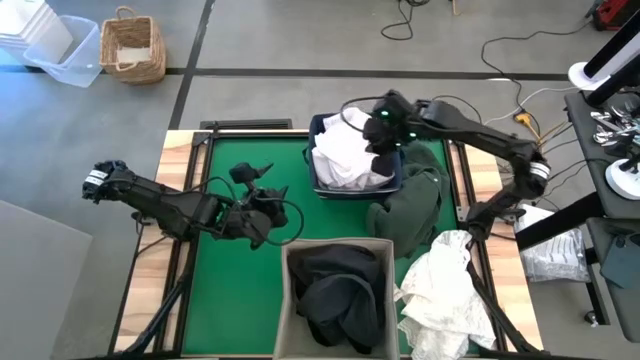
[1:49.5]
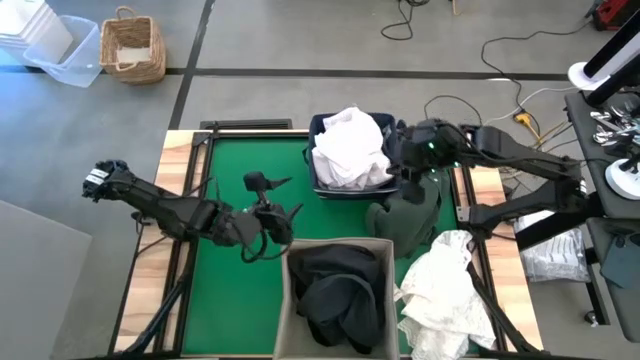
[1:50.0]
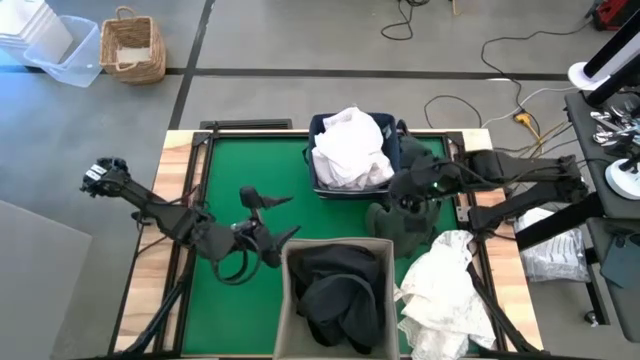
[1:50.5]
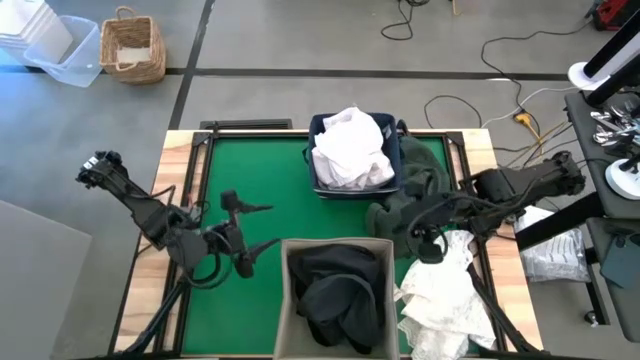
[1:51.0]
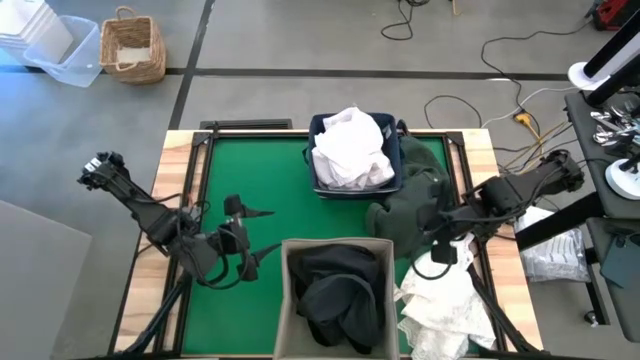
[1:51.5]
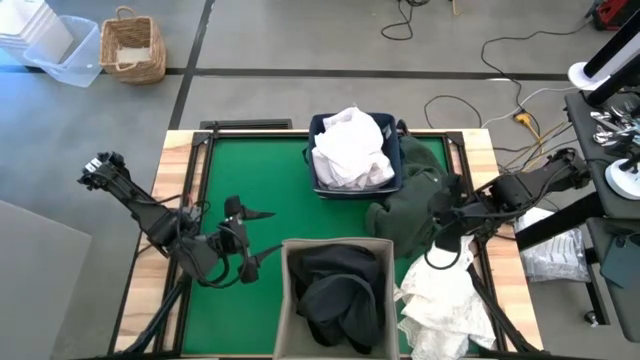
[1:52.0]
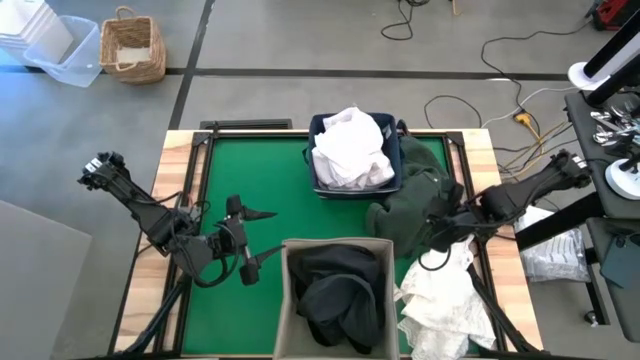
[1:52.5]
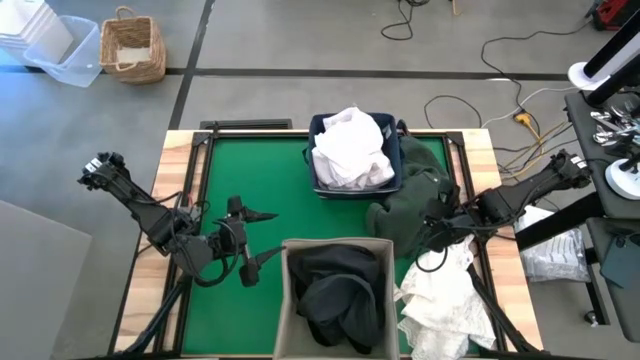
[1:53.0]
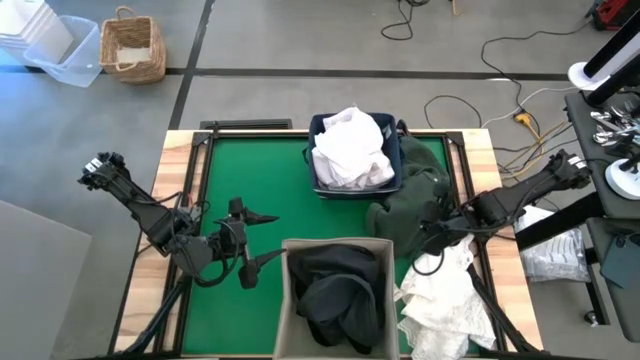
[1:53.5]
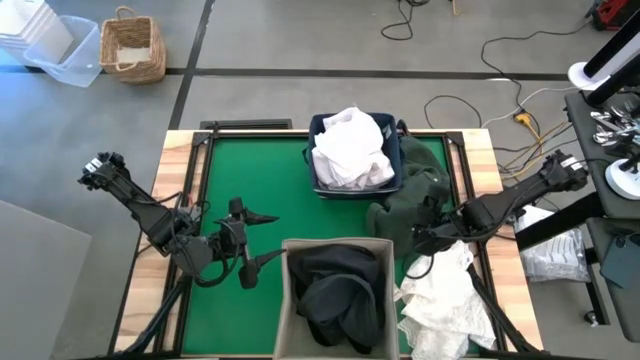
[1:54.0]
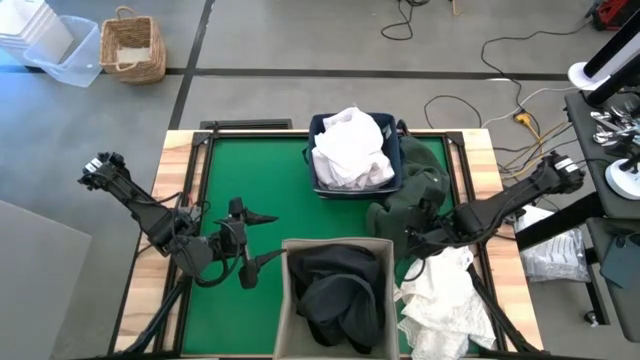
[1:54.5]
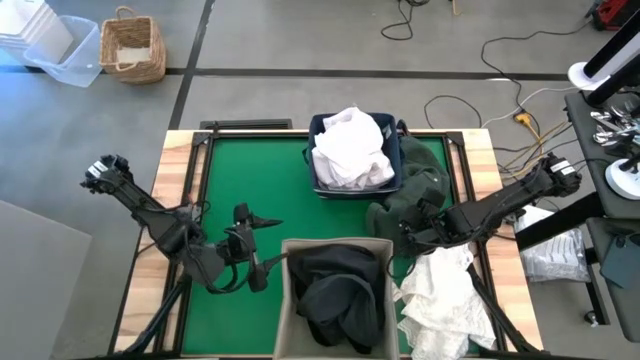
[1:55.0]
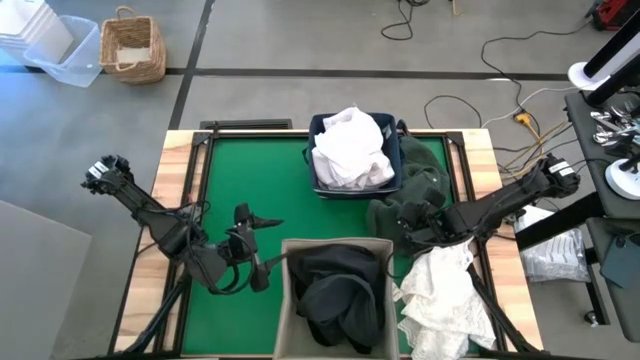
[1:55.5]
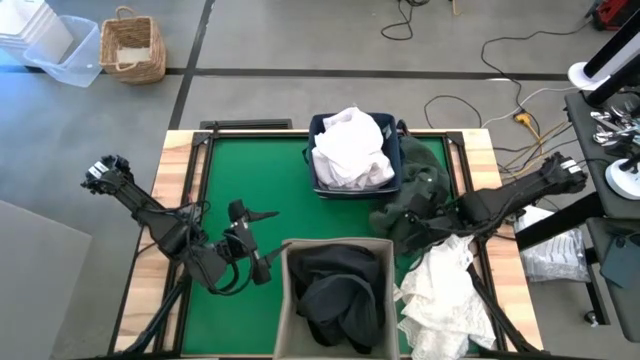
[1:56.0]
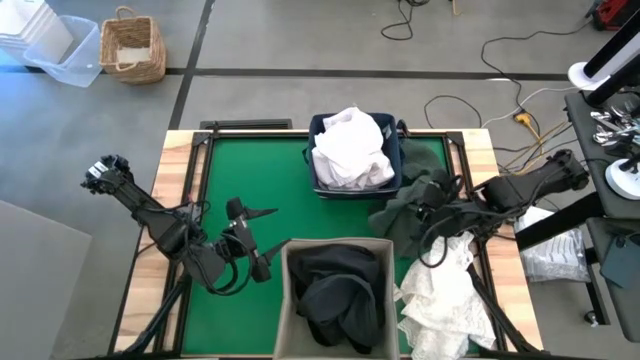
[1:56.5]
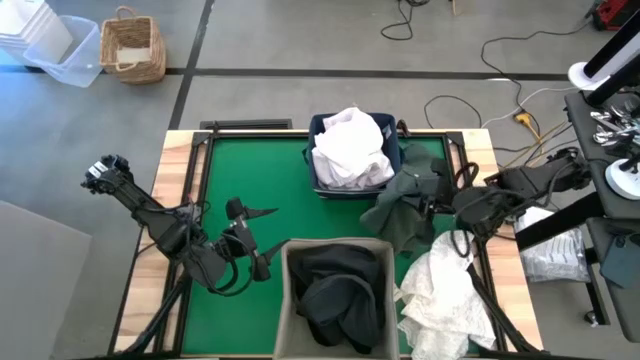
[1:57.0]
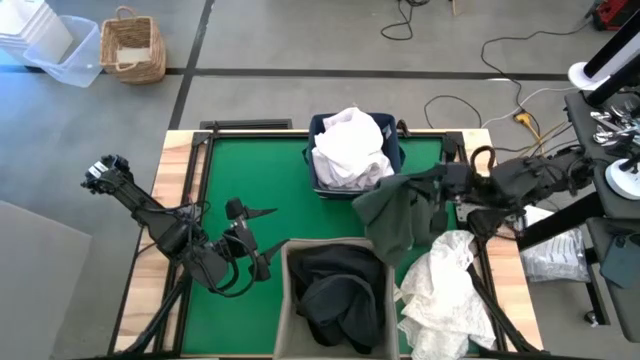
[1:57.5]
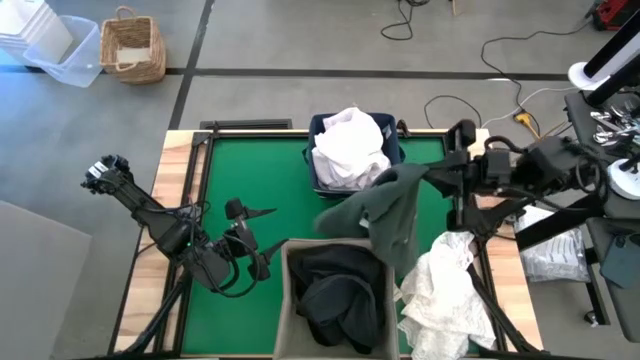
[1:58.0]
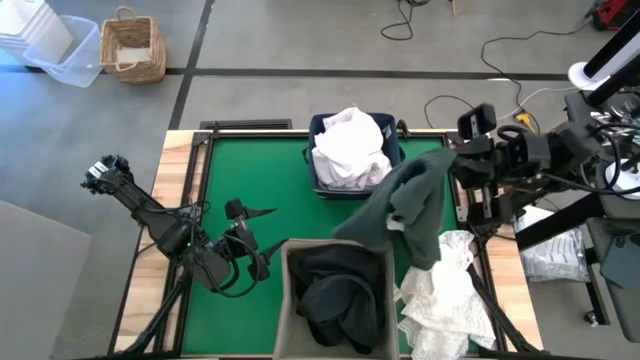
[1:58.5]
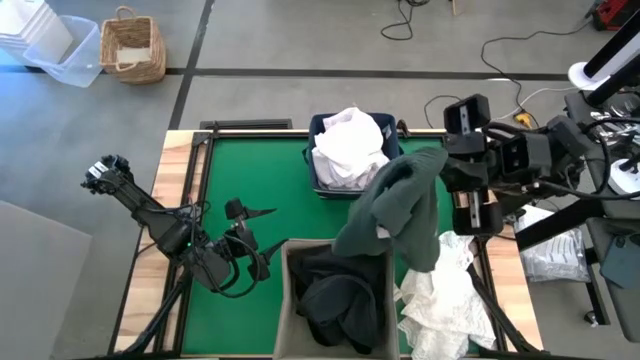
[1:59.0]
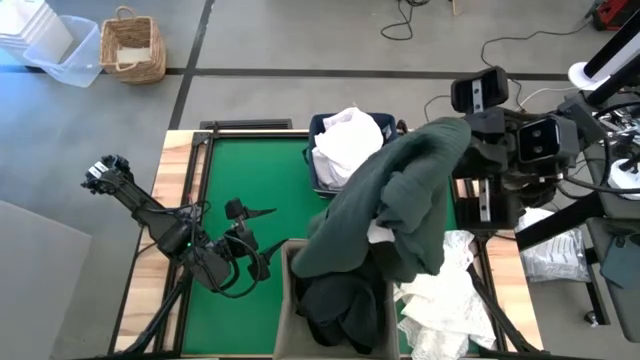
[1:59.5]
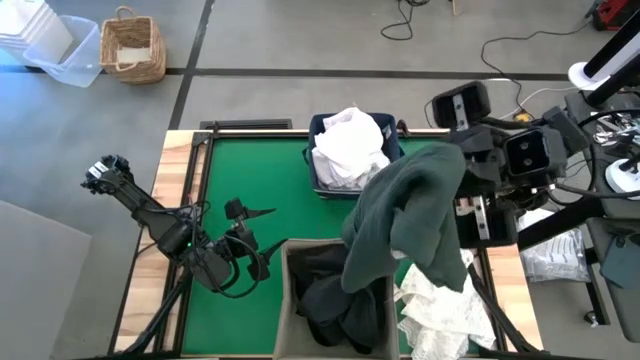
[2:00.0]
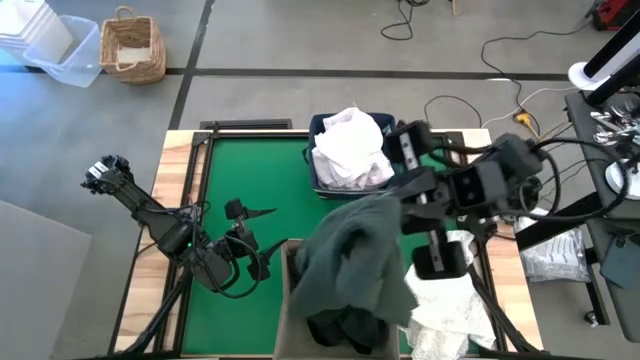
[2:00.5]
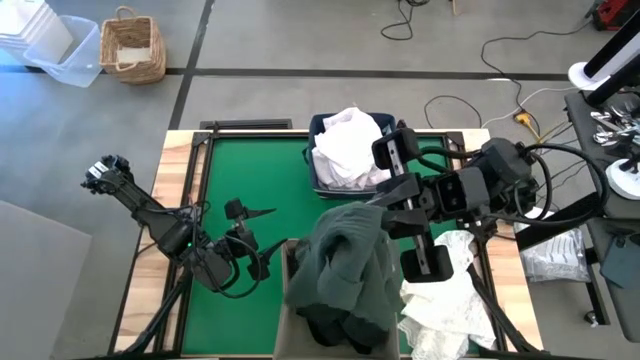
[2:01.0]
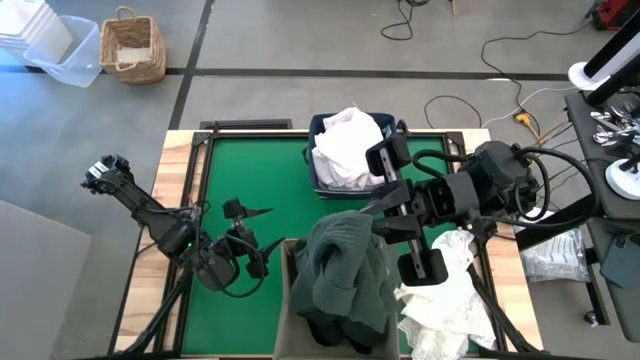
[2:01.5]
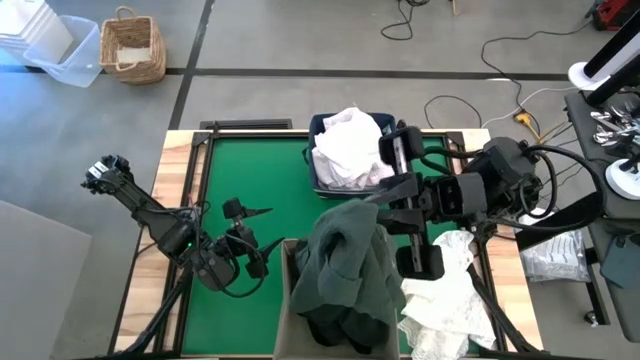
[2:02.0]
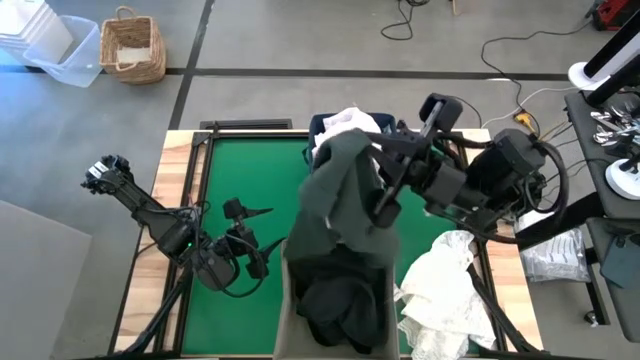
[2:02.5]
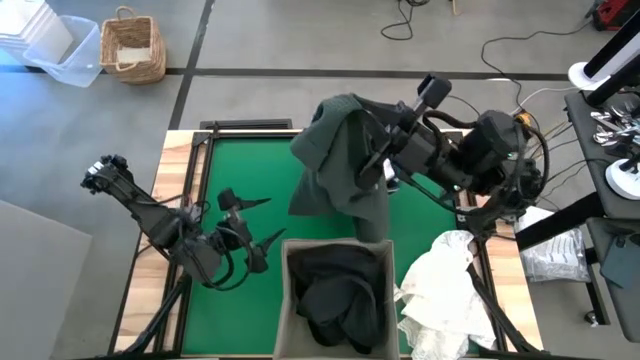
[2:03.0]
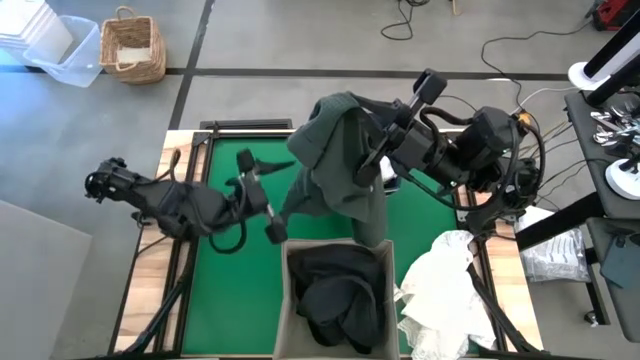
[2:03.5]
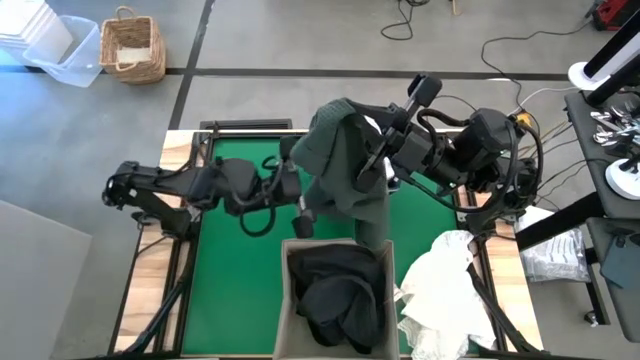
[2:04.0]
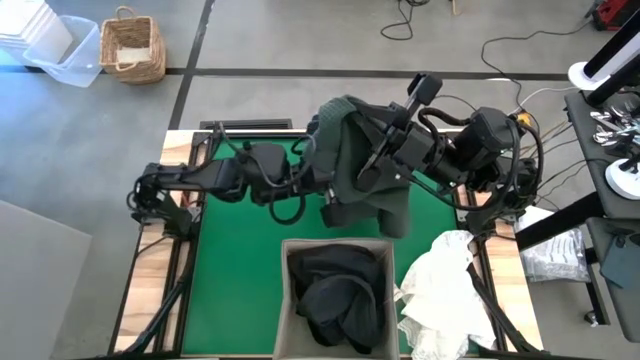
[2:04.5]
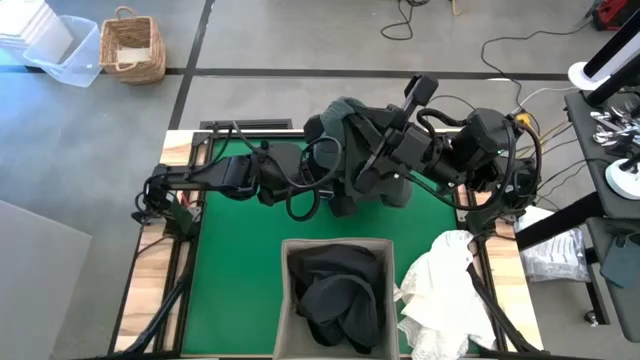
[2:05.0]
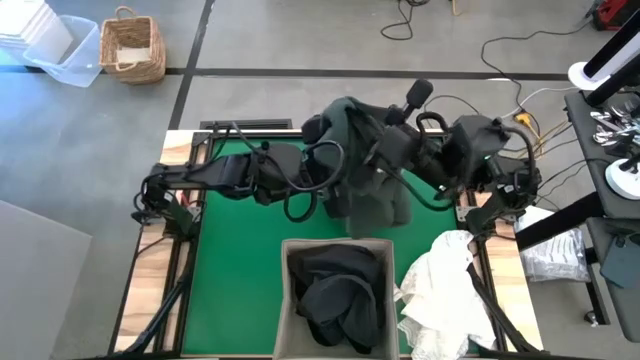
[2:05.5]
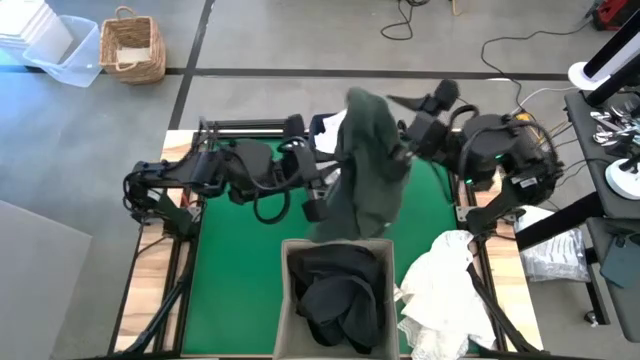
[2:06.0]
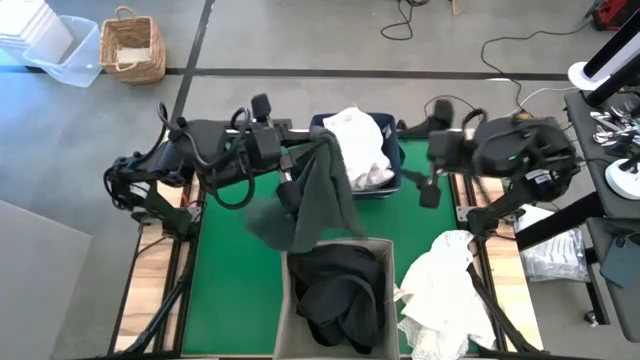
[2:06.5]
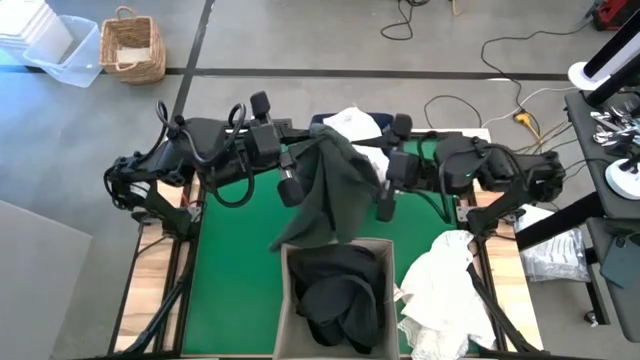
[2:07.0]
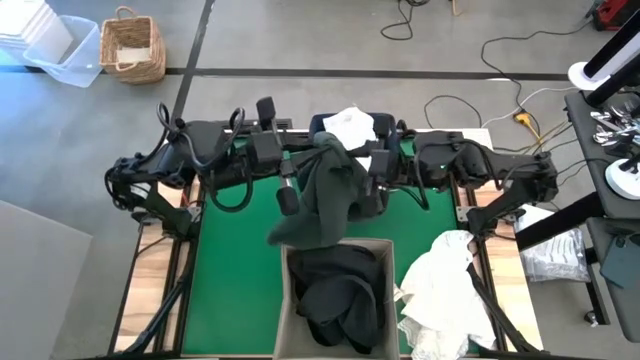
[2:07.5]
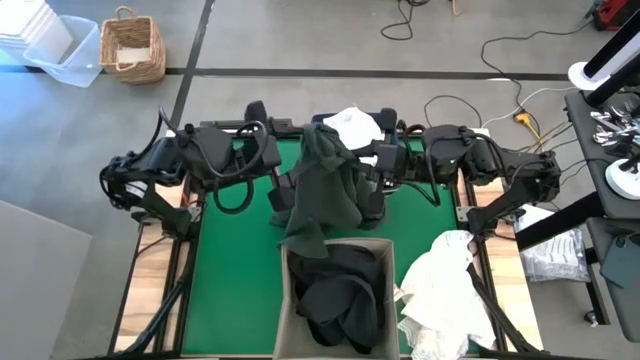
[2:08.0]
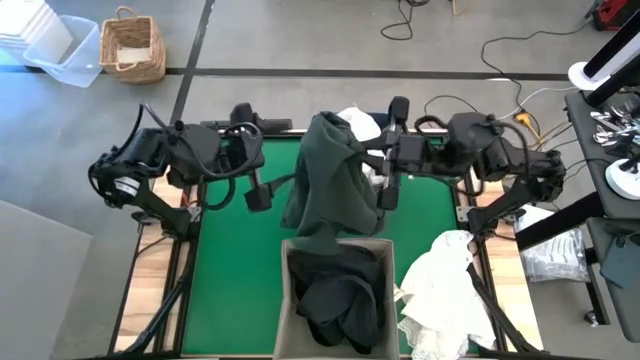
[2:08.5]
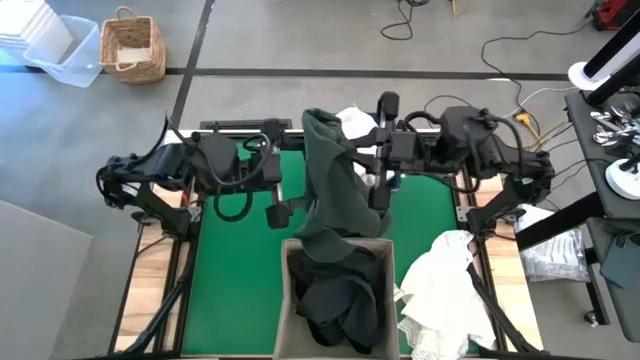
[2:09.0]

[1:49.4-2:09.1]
Put the green polo into the white laundry bin
